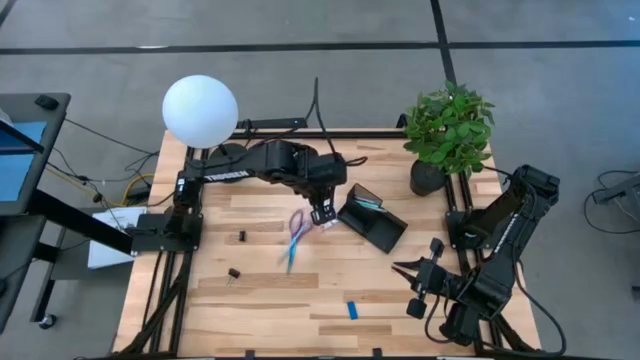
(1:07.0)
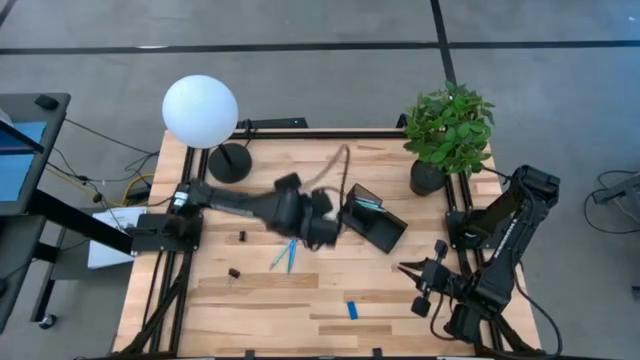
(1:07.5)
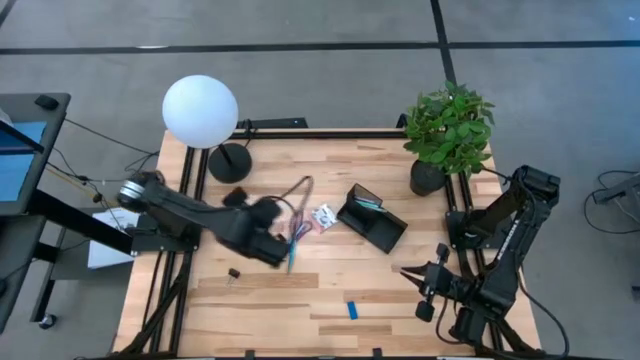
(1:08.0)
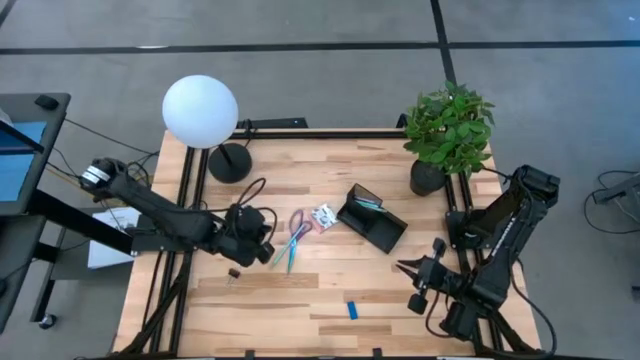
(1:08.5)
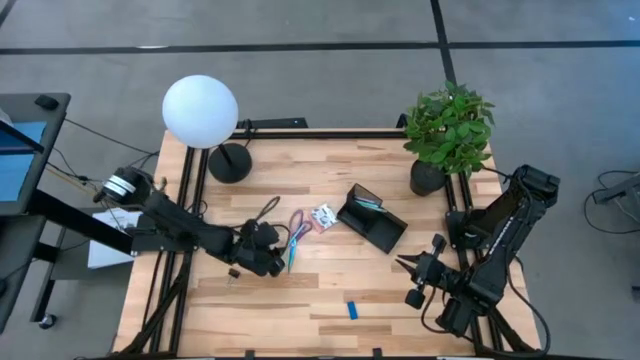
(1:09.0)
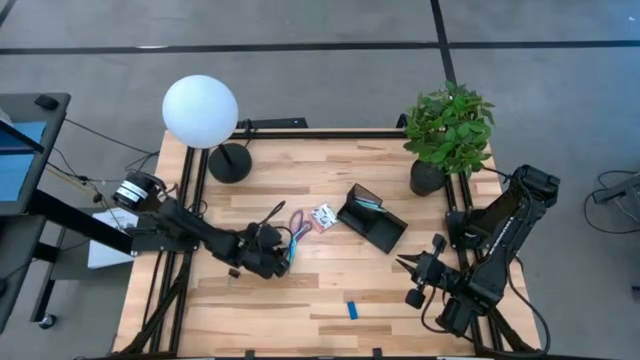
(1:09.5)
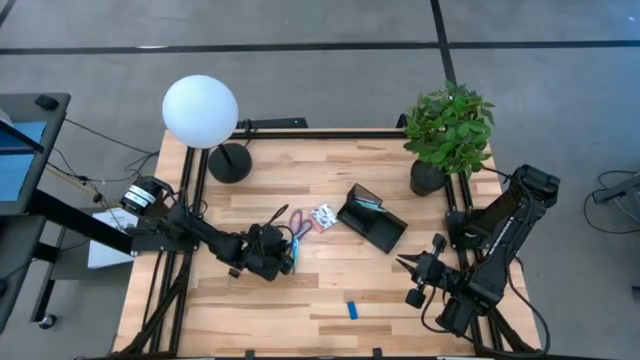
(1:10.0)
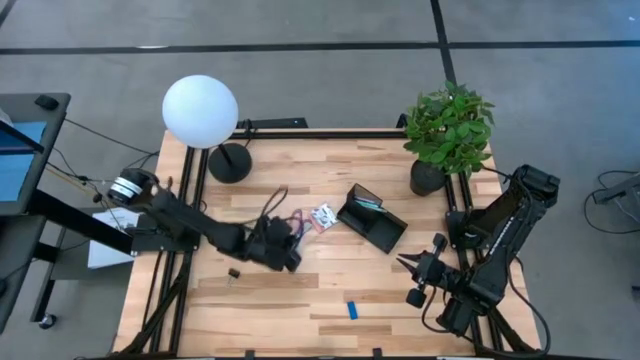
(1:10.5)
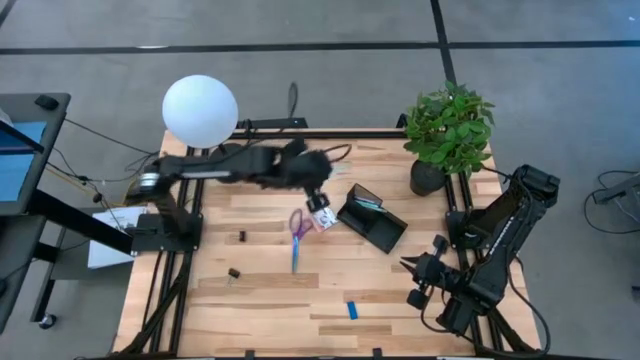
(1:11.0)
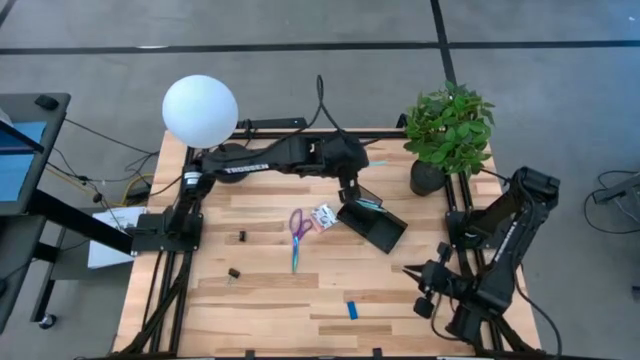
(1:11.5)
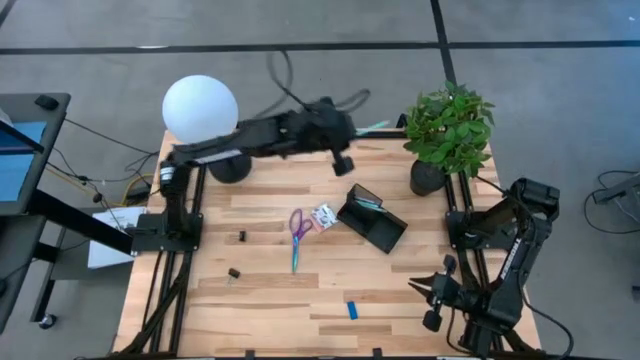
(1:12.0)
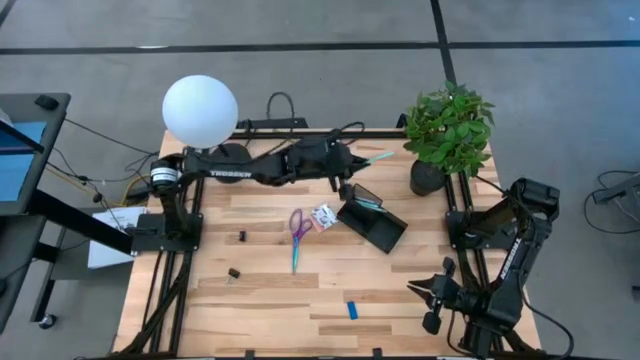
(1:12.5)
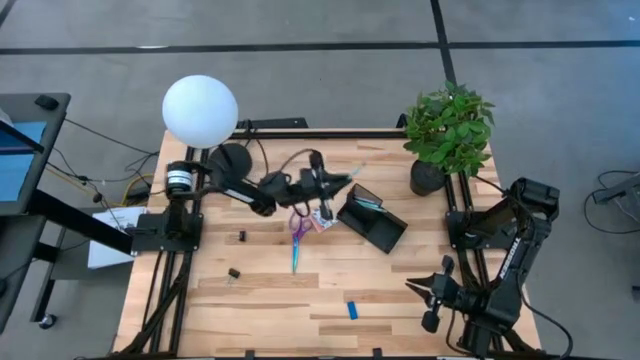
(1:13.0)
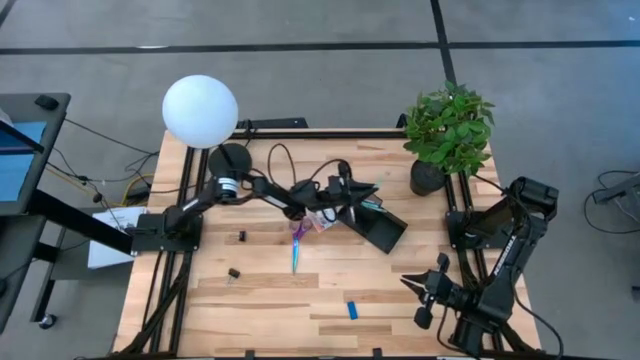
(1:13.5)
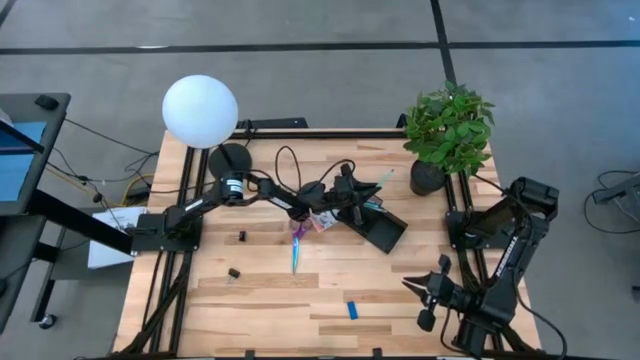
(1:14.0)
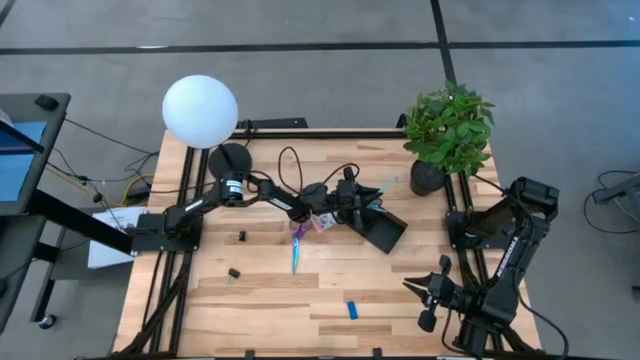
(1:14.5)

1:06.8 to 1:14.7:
Task: Pick and place office supplies into organizer
Put the light blue pencil into the black desk organizer

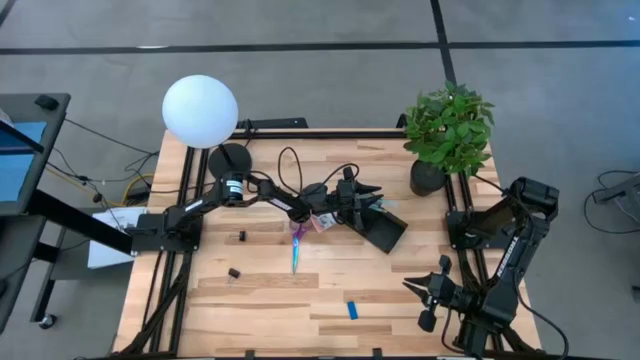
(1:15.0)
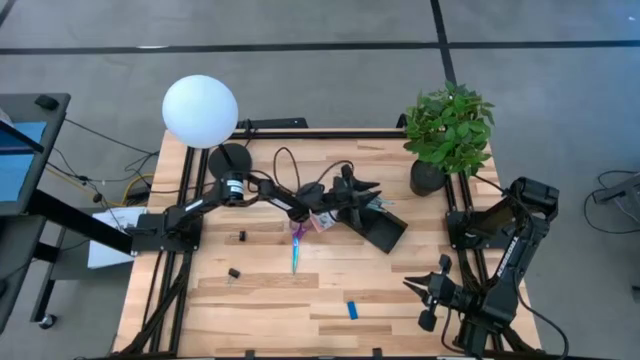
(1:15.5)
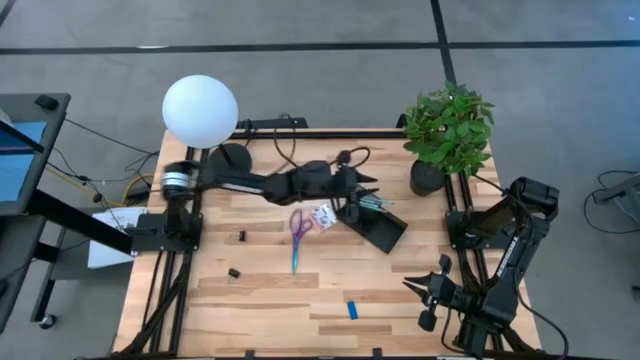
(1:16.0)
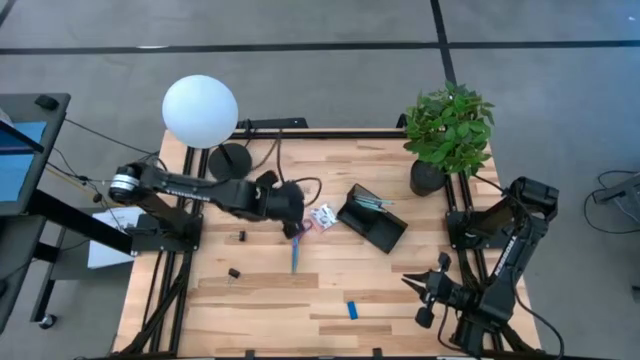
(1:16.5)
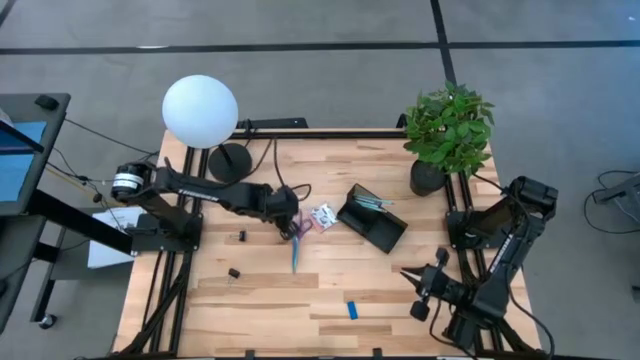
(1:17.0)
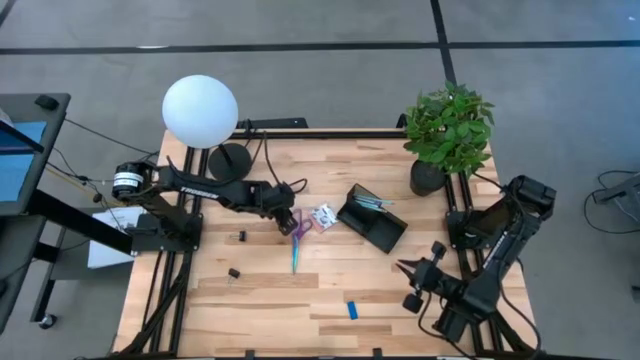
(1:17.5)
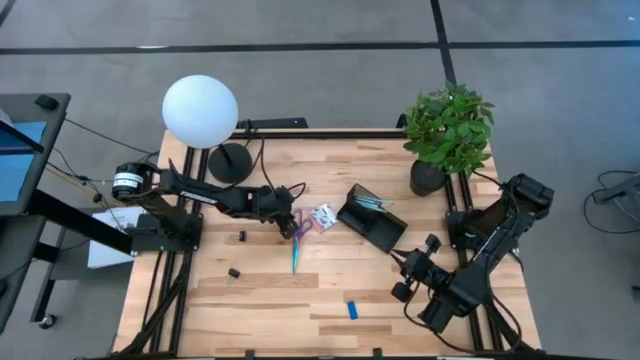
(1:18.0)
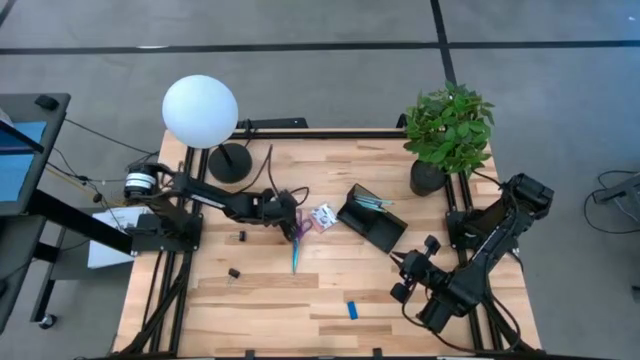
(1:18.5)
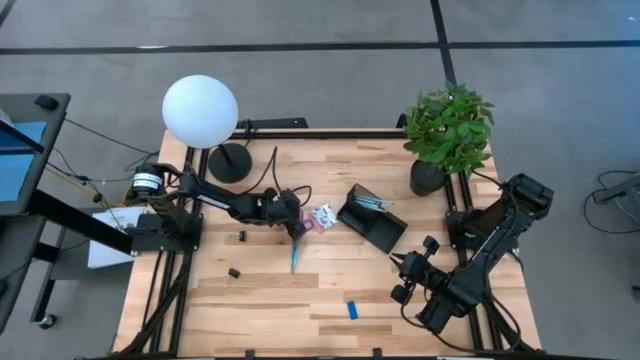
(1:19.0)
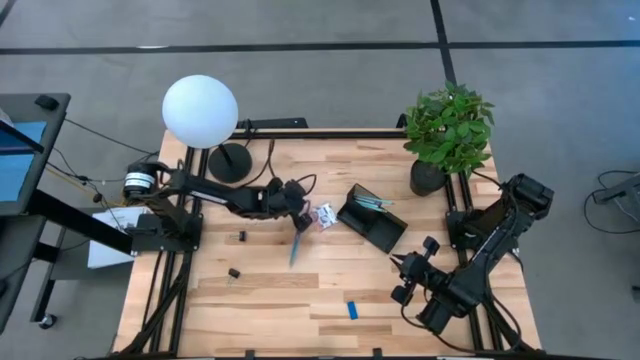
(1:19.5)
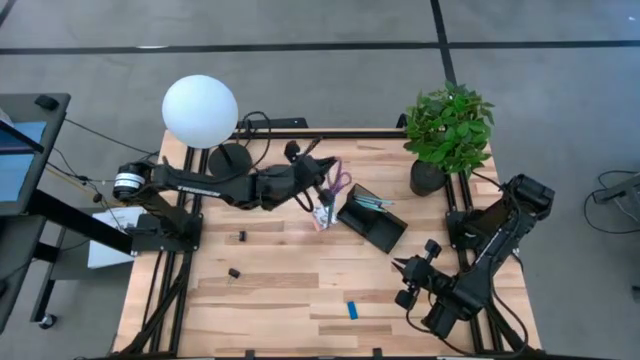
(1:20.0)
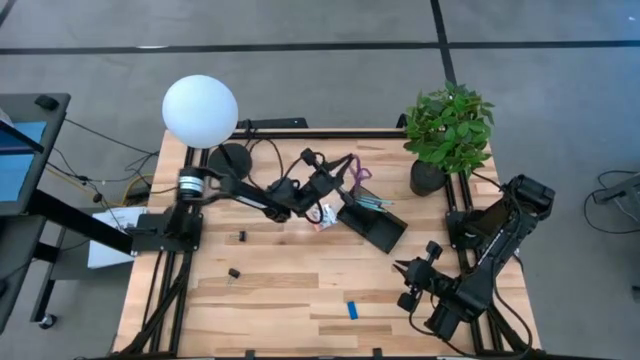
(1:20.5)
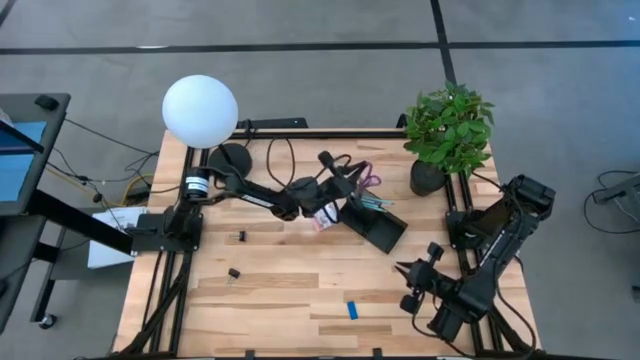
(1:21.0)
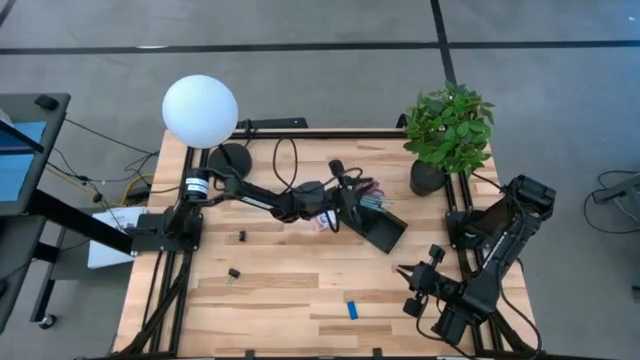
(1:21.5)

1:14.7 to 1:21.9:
Put the purple scissors into the black desk organizer

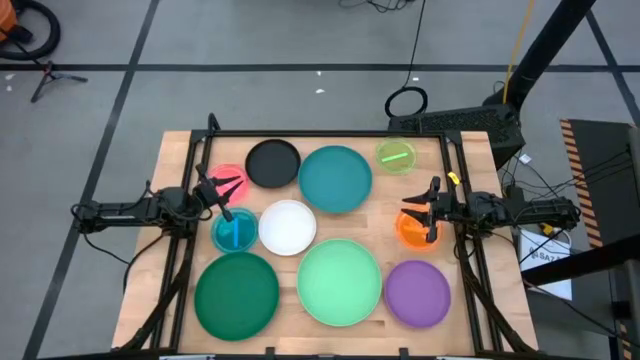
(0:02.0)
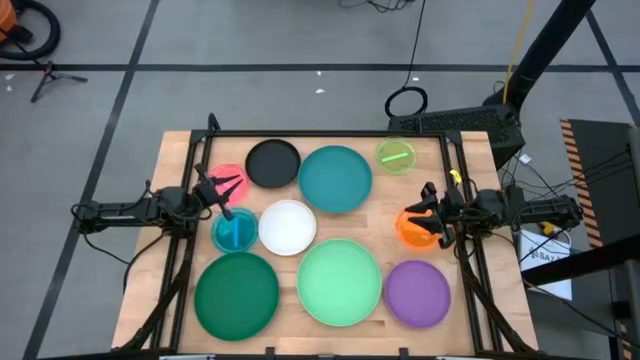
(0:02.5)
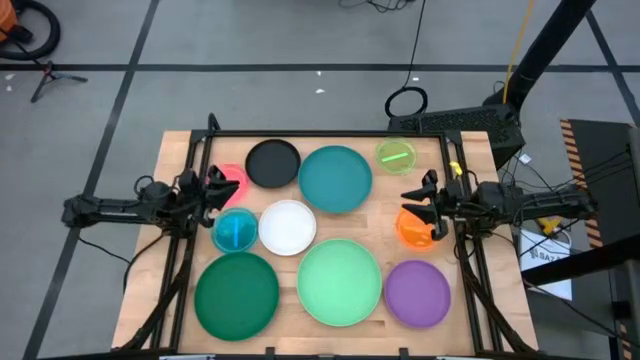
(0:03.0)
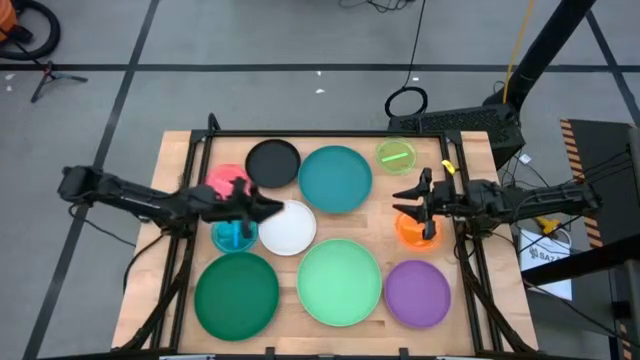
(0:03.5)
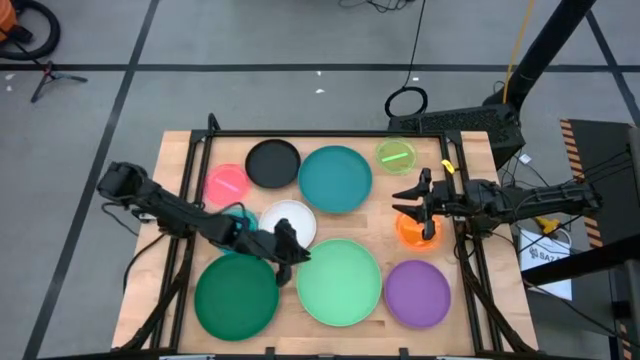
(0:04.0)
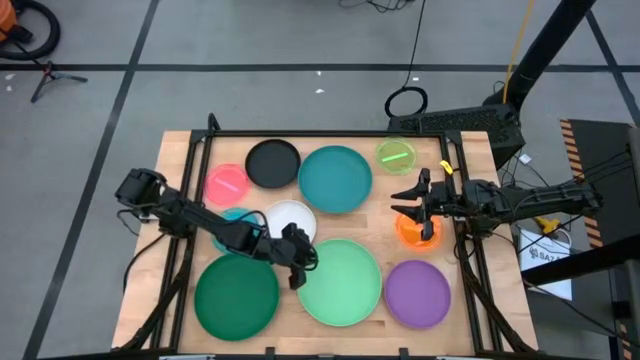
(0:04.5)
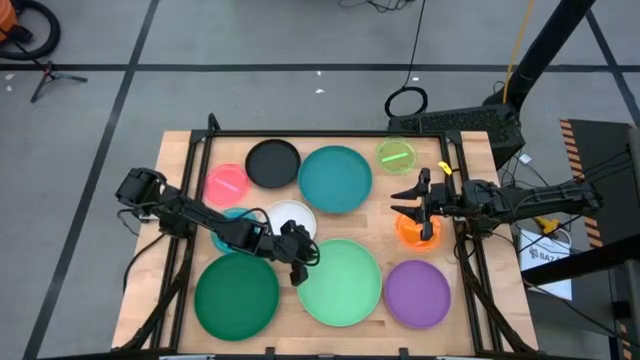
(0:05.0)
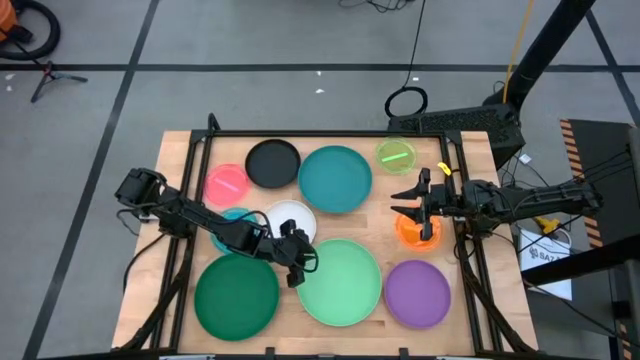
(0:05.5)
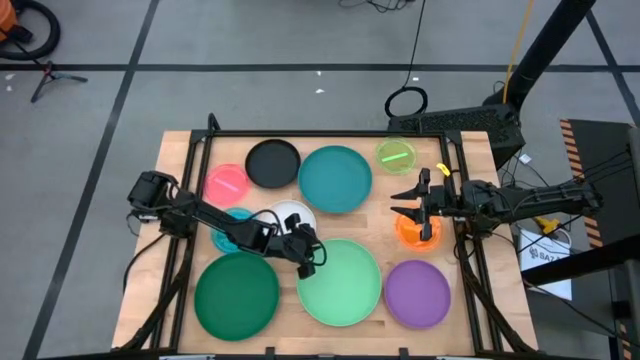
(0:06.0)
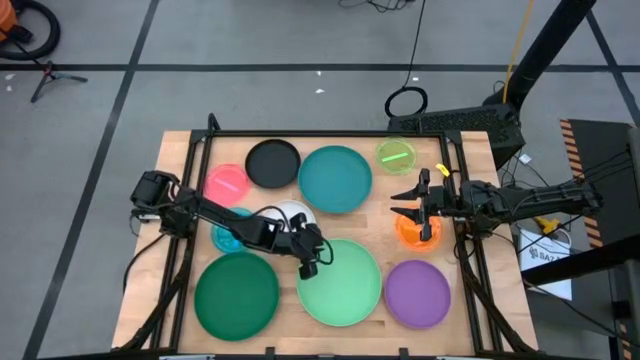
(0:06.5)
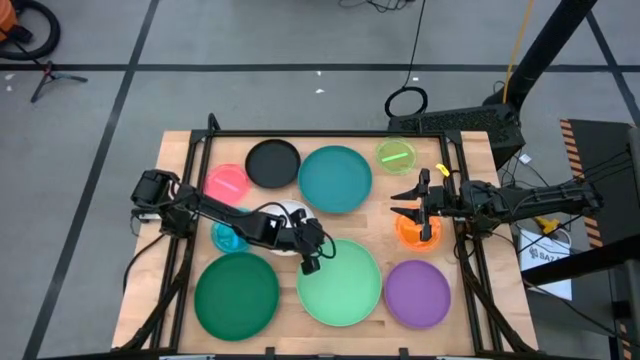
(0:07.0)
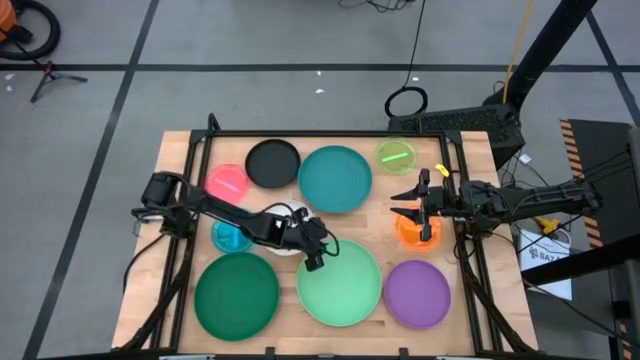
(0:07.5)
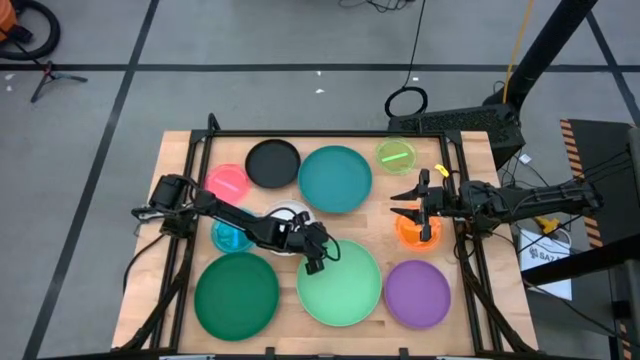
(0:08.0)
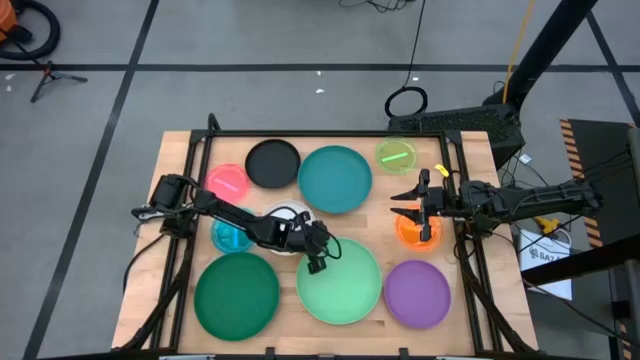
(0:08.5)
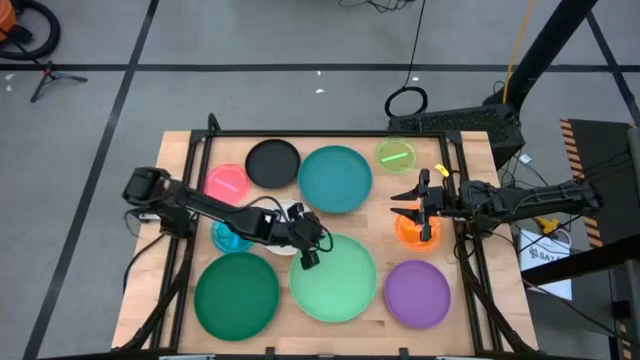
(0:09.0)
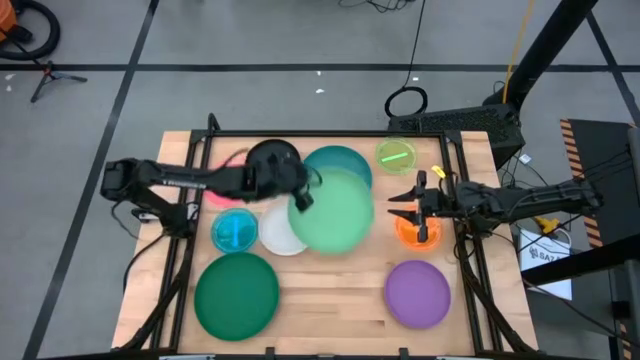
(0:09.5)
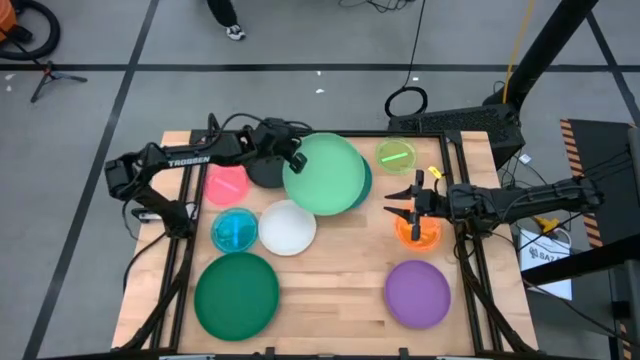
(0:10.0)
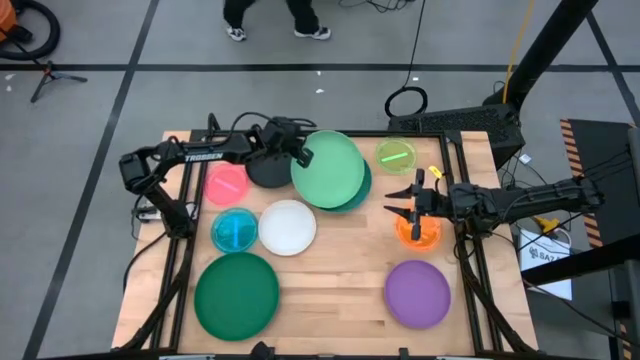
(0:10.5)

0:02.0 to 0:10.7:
Task: Stack plastic plates
Stack the light green plate on top of the blue plate
